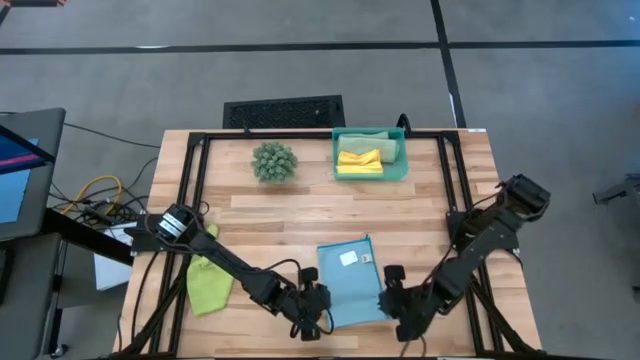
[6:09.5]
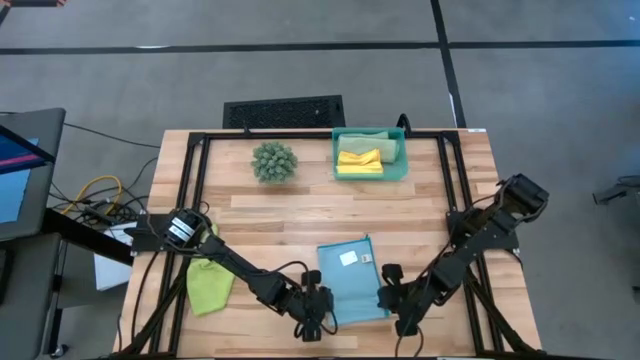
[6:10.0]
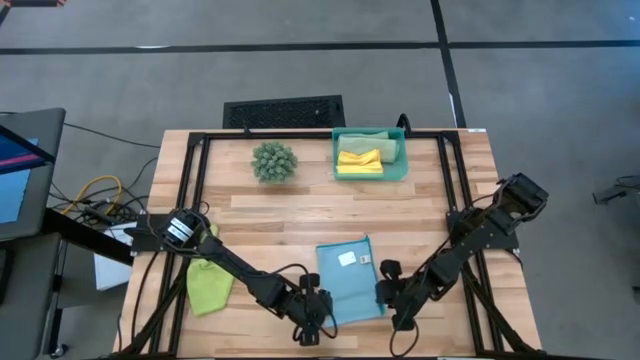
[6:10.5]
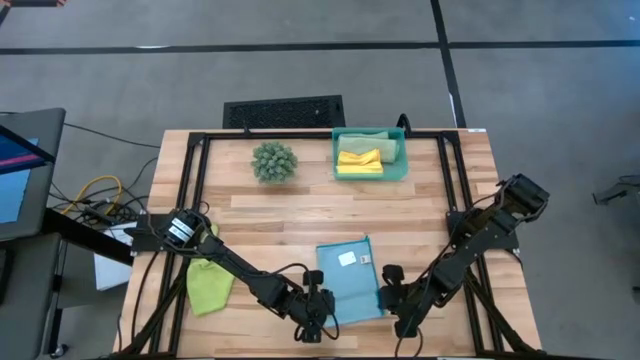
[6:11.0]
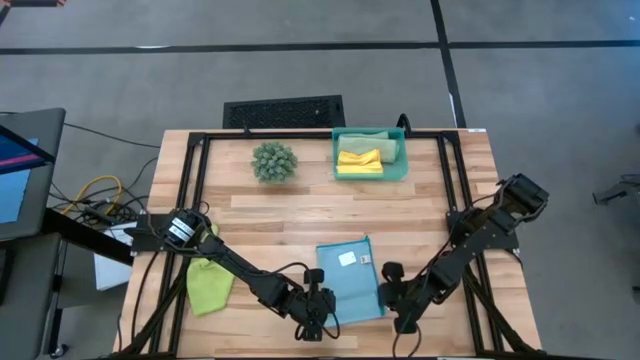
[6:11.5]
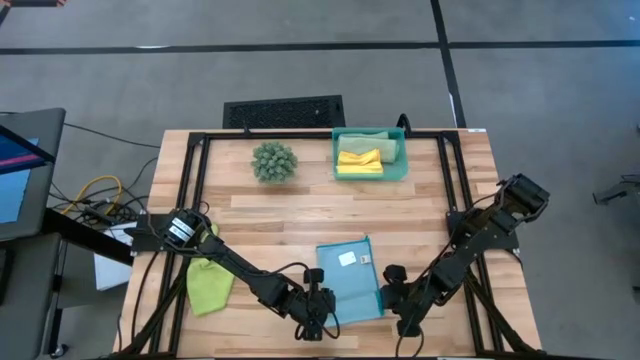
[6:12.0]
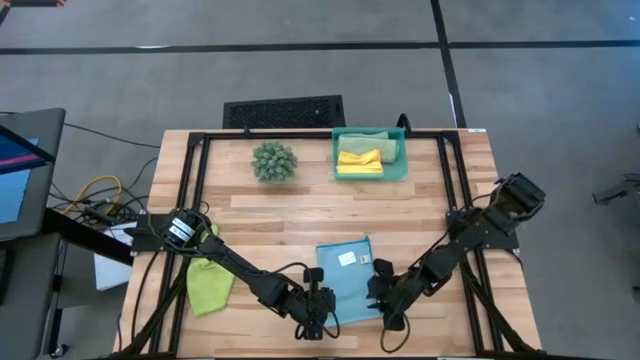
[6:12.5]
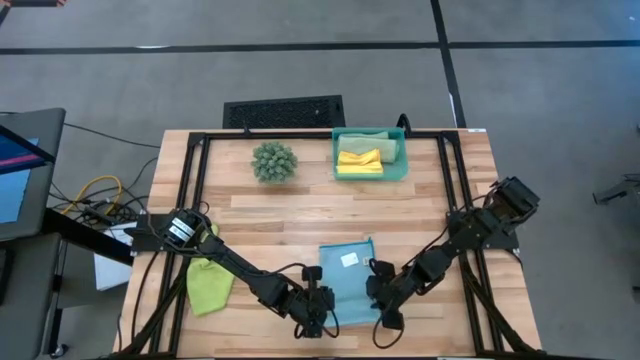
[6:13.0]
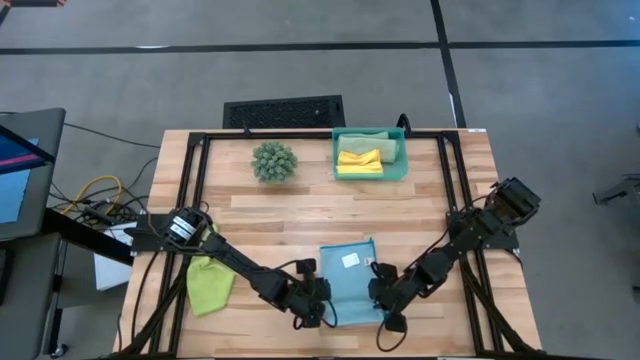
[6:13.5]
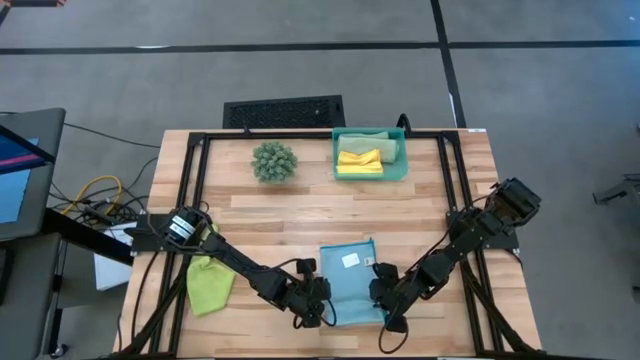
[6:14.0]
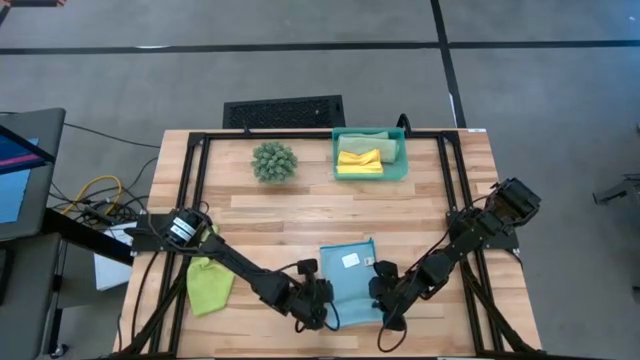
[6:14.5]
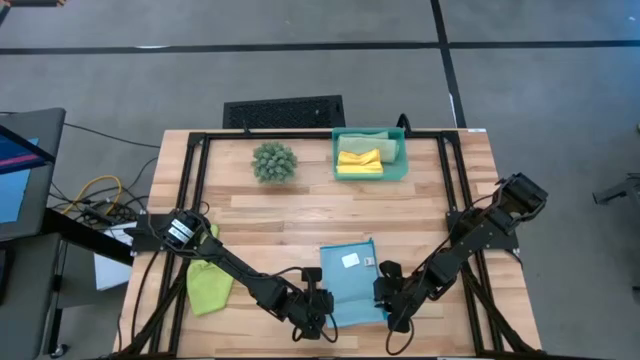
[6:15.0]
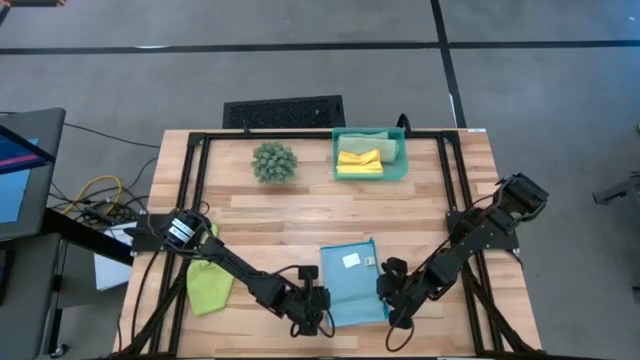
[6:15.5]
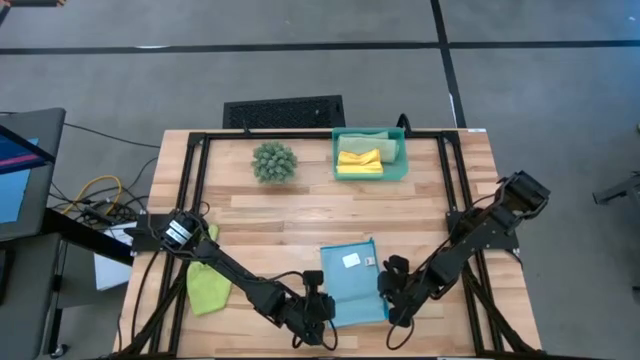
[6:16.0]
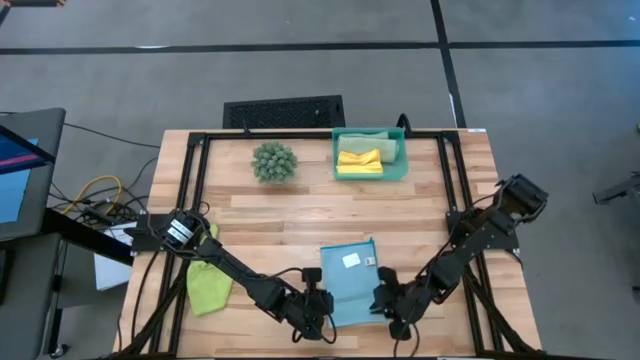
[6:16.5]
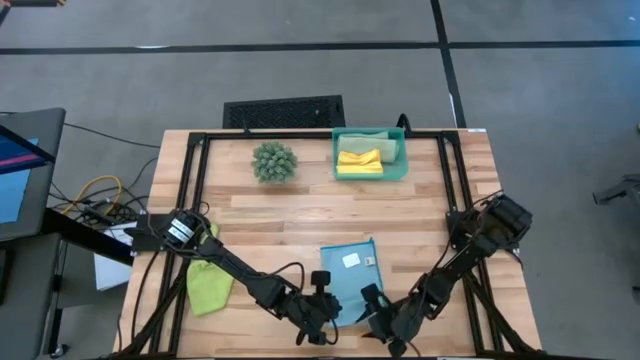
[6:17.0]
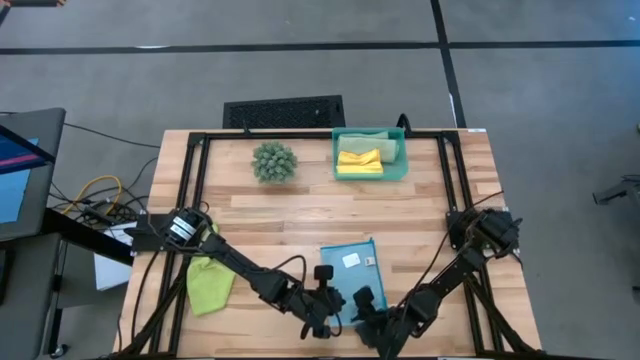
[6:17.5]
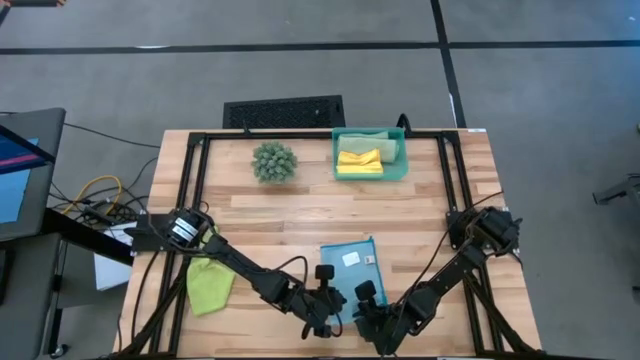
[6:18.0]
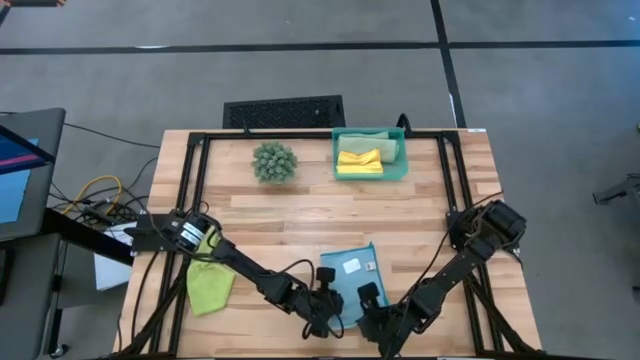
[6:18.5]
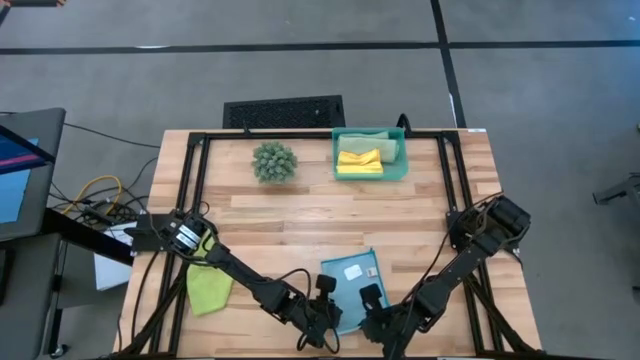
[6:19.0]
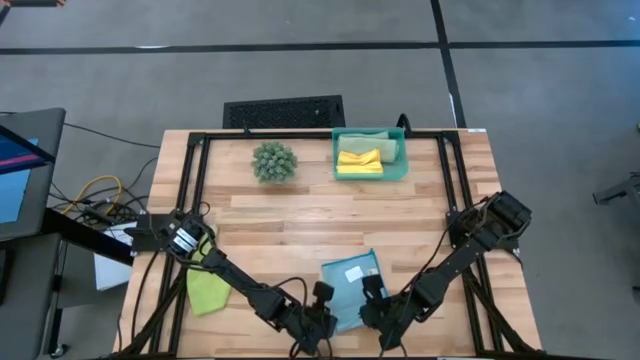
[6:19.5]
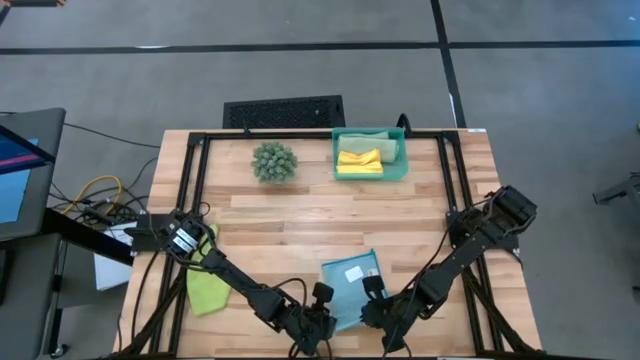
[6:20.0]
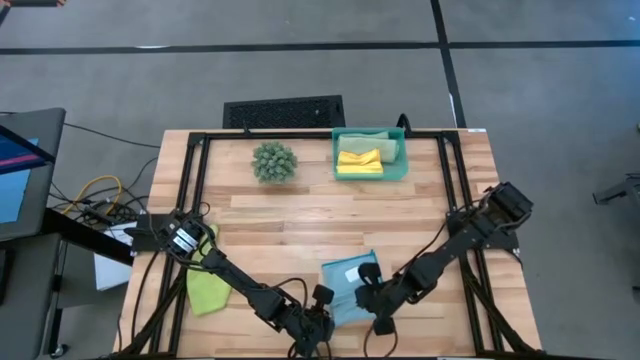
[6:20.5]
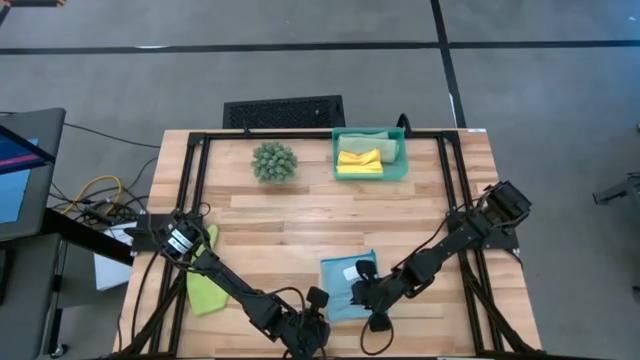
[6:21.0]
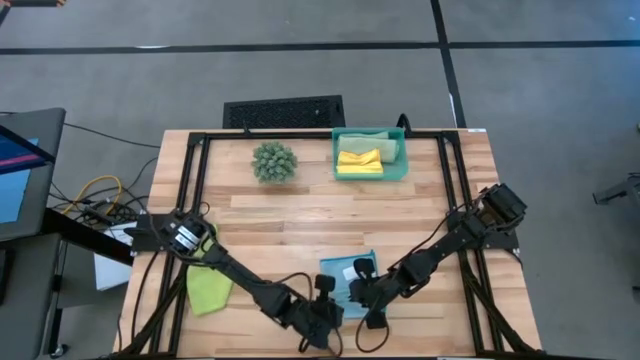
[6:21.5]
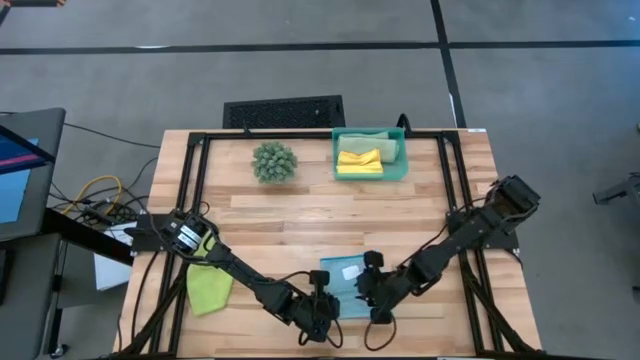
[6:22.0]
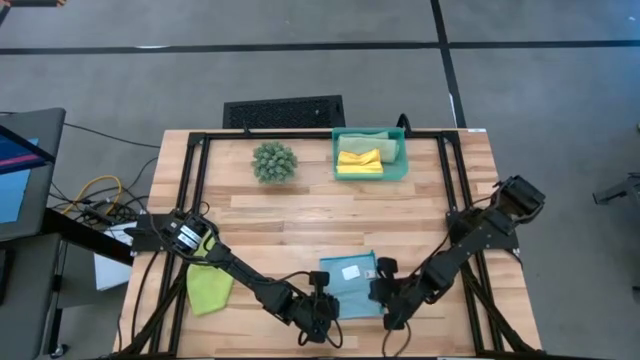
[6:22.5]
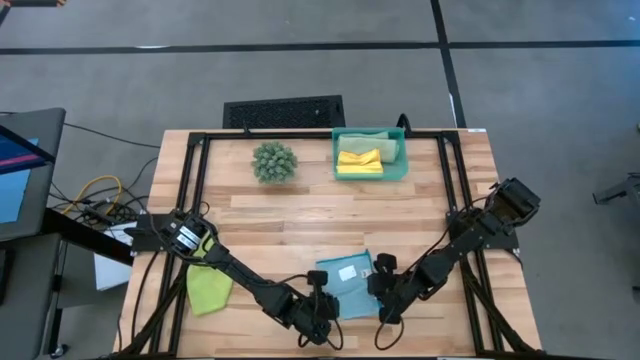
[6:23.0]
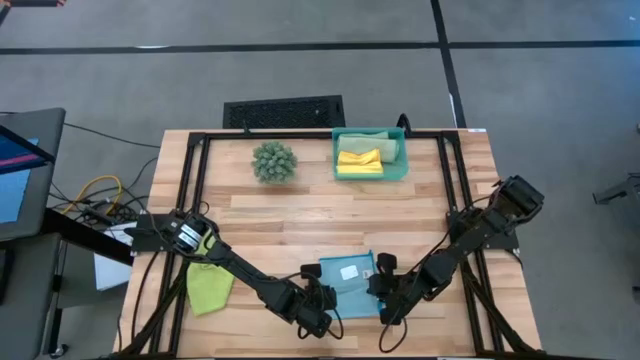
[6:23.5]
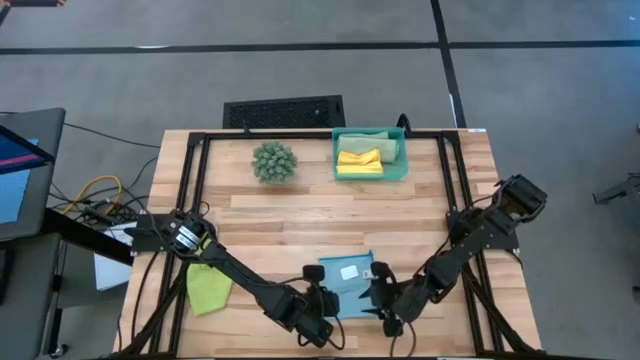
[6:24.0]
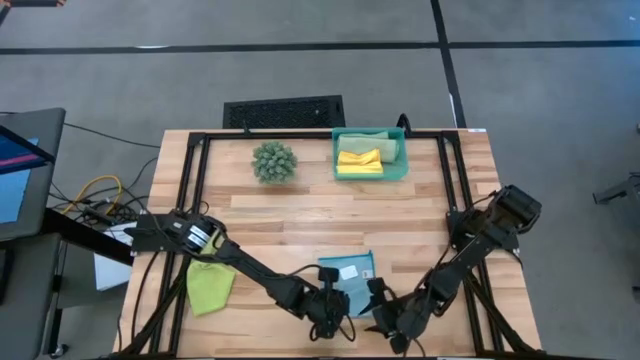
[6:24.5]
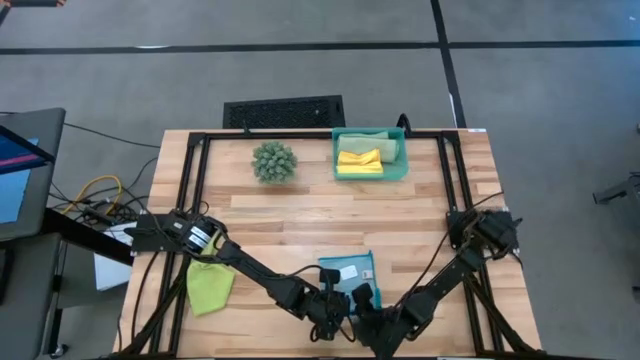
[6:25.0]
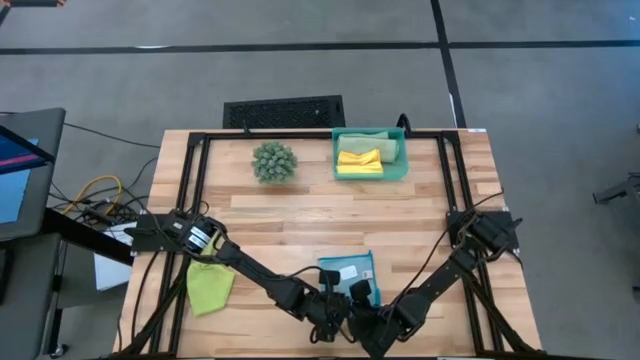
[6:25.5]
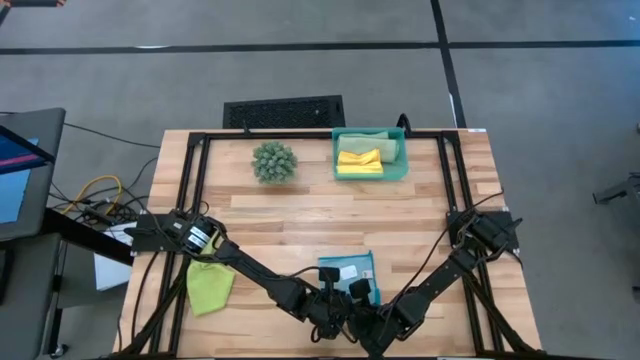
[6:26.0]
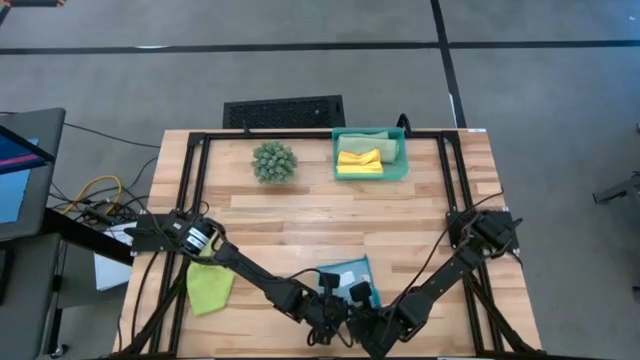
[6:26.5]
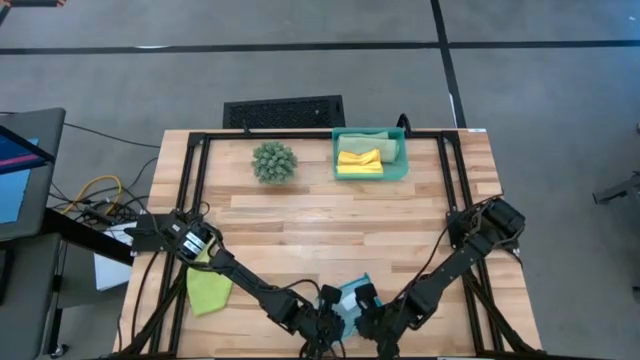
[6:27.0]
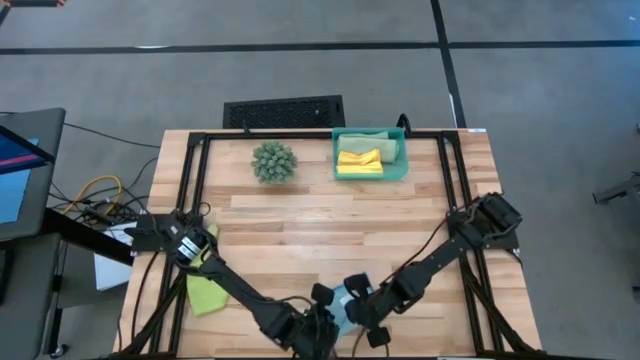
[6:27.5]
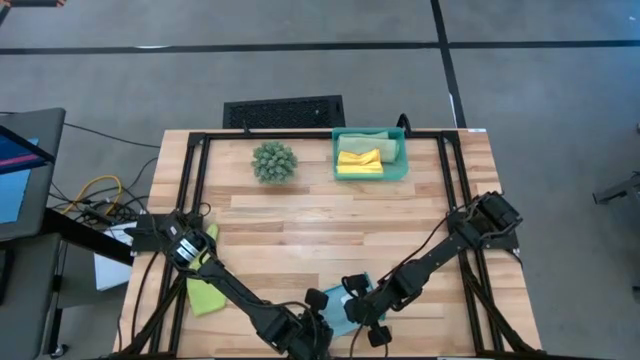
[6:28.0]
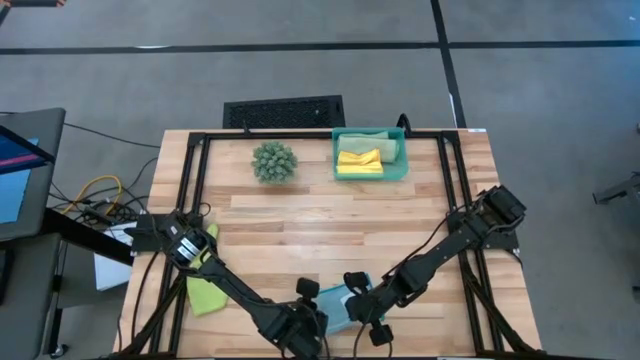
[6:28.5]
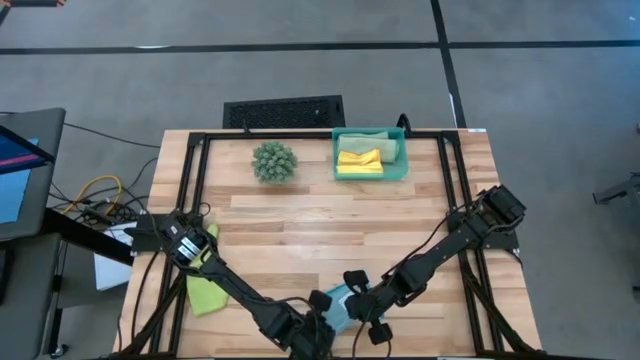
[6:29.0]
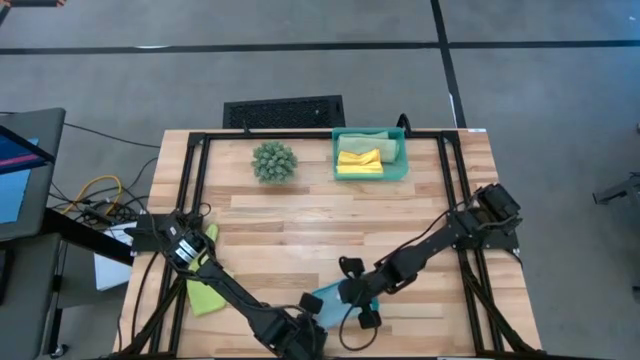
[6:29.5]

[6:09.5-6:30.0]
Task: Roll microfiber towels into tight, uniform cylinder then place into a basket
Roll the blue microfiber cloth
